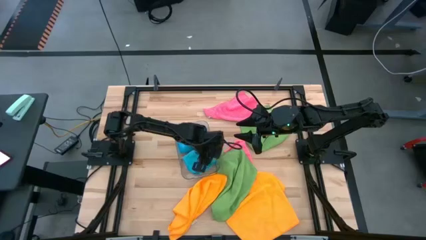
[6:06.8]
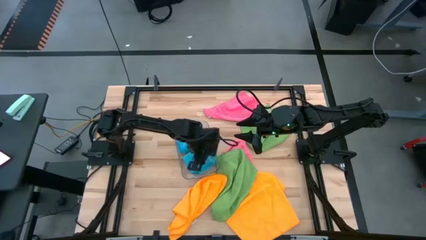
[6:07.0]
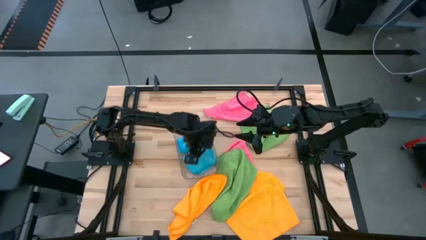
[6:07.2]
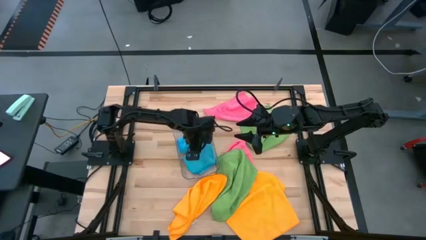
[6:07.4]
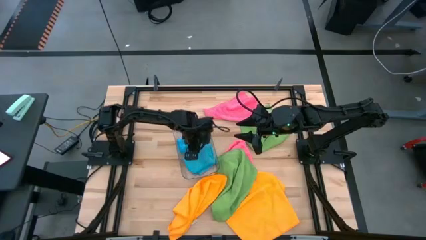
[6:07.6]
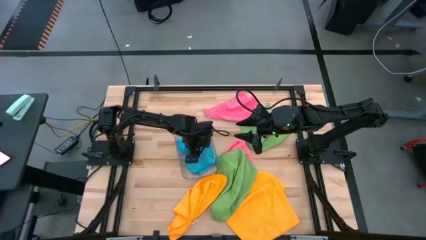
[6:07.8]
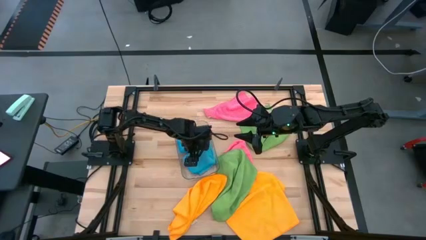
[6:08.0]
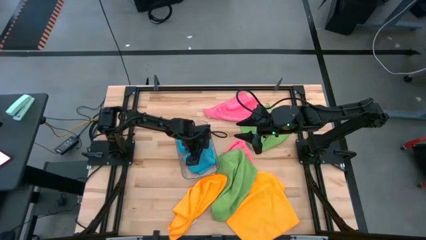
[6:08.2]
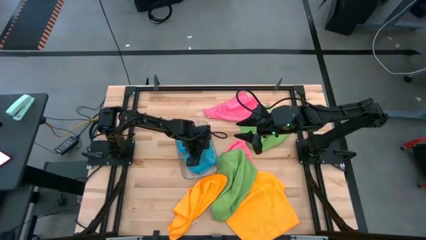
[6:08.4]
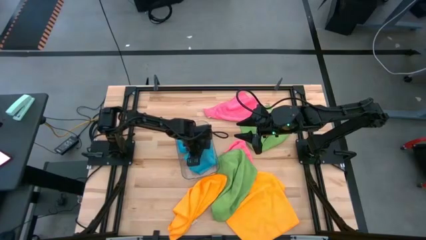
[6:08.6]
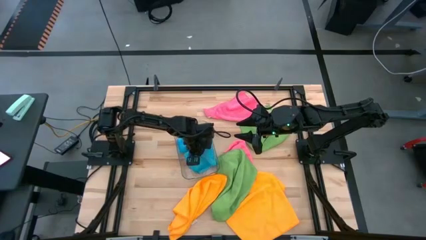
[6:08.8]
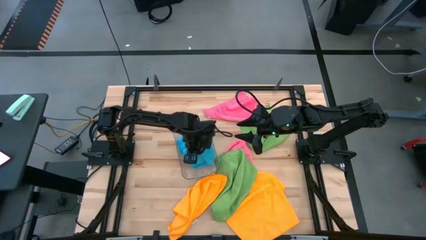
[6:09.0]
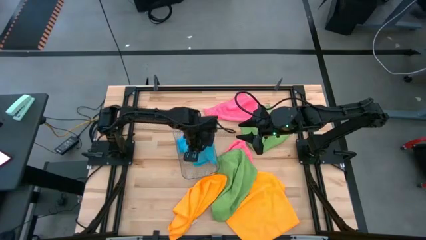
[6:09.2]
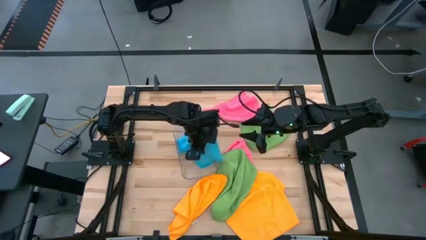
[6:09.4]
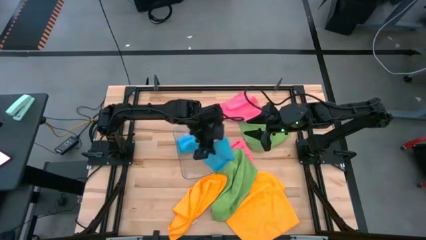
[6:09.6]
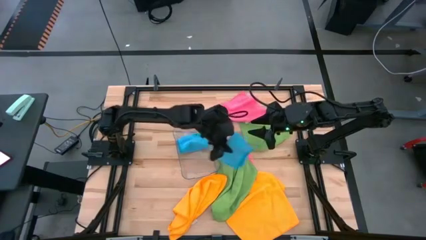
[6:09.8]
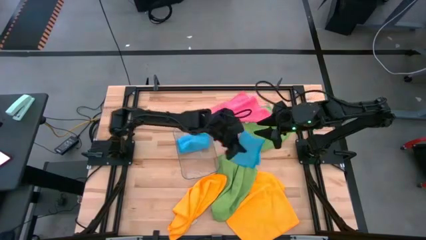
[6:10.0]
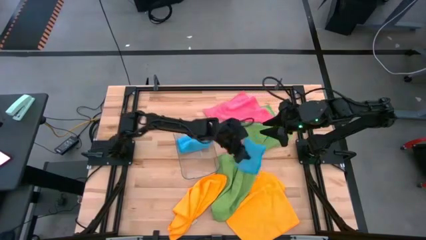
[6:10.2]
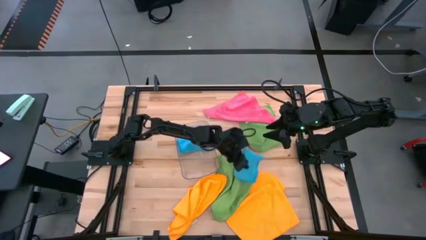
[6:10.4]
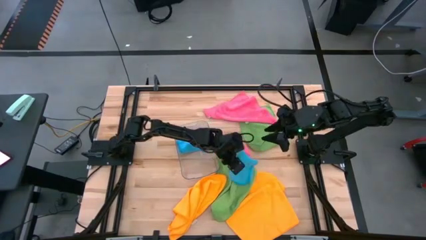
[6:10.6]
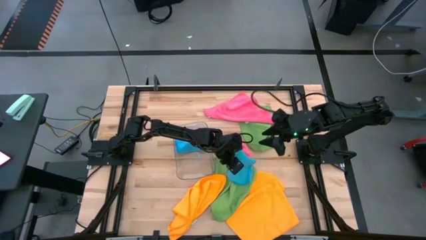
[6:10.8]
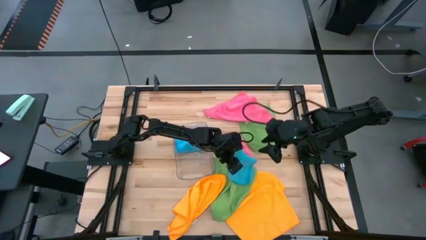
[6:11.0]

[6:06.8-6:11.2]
Task: Fold microfiber towels
Remove the blue towel from the transparent bin

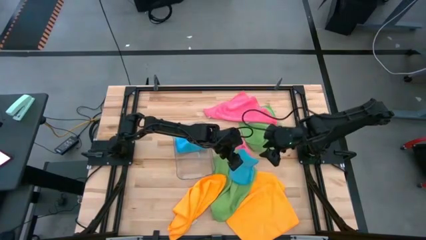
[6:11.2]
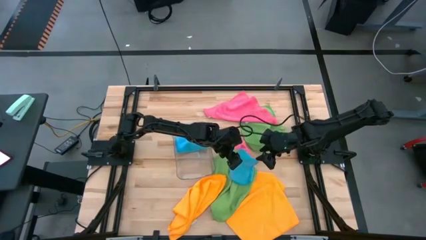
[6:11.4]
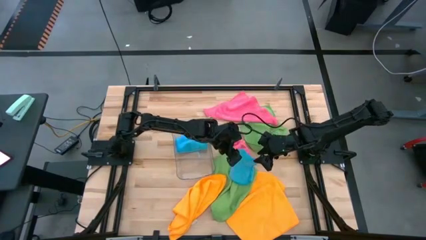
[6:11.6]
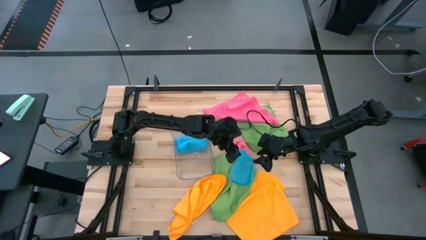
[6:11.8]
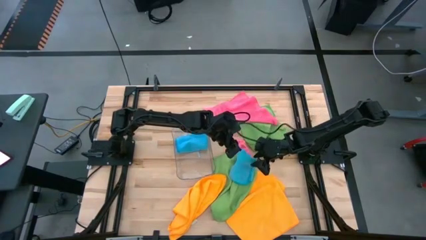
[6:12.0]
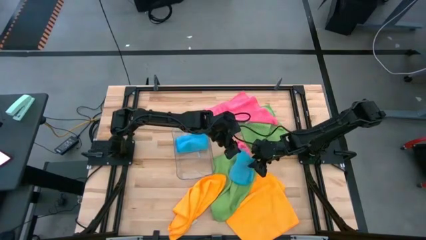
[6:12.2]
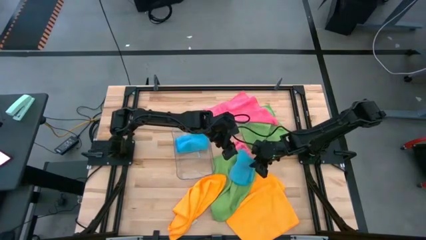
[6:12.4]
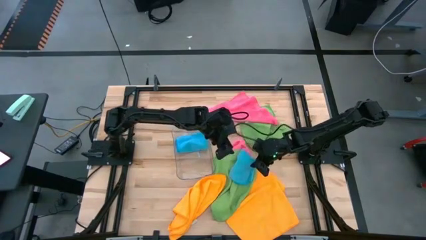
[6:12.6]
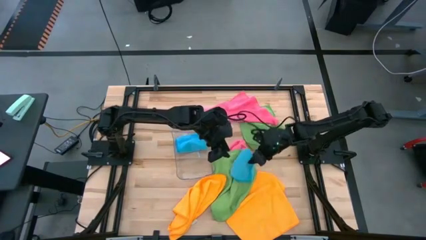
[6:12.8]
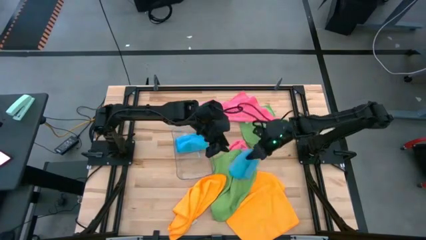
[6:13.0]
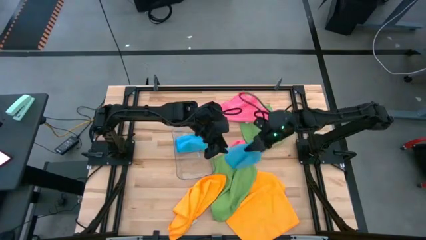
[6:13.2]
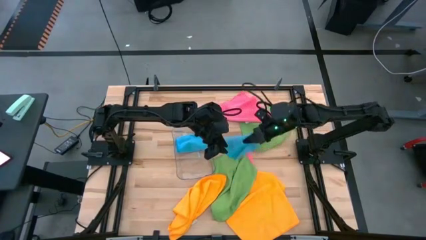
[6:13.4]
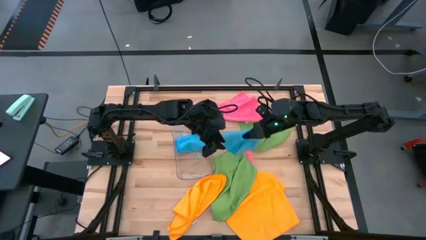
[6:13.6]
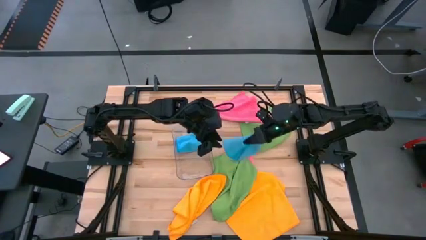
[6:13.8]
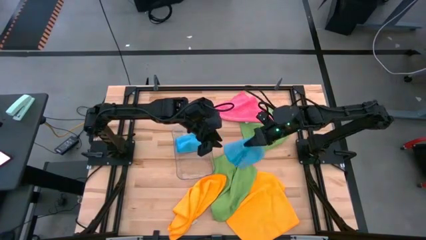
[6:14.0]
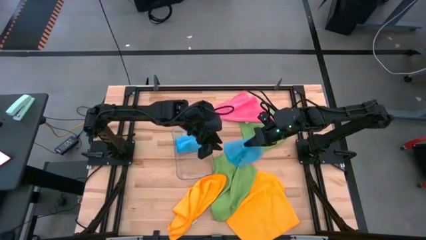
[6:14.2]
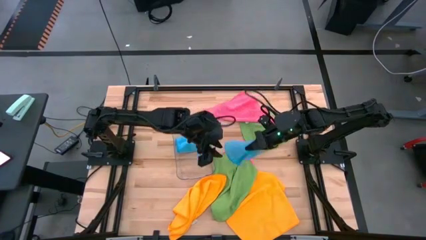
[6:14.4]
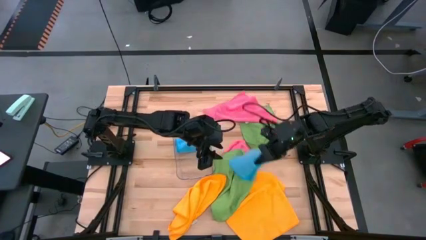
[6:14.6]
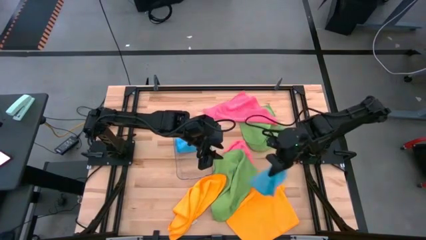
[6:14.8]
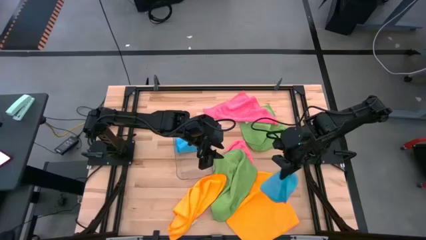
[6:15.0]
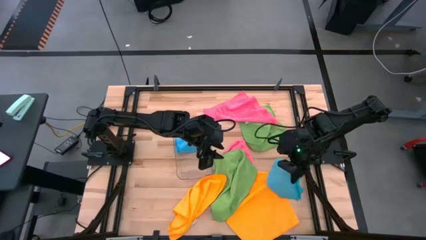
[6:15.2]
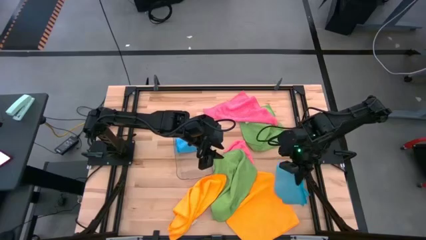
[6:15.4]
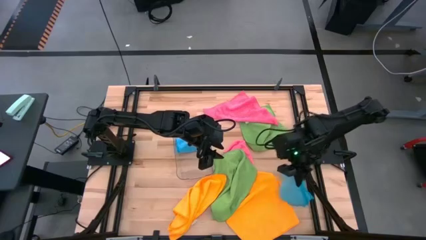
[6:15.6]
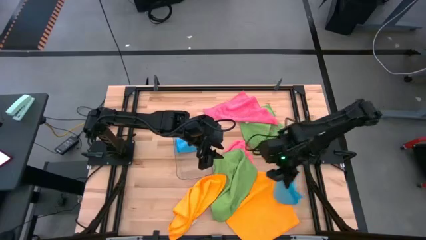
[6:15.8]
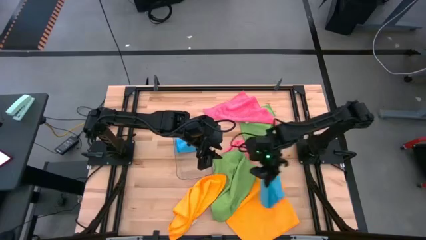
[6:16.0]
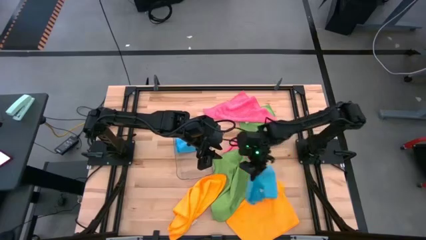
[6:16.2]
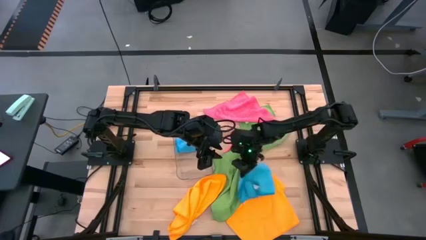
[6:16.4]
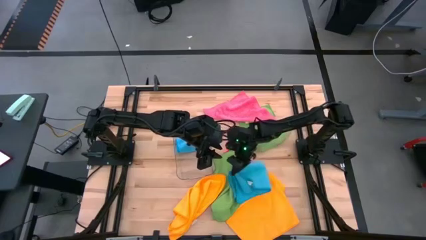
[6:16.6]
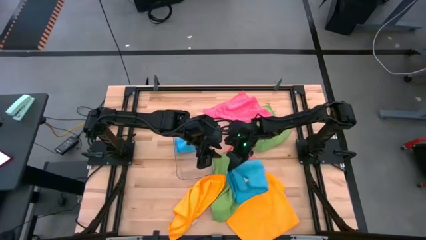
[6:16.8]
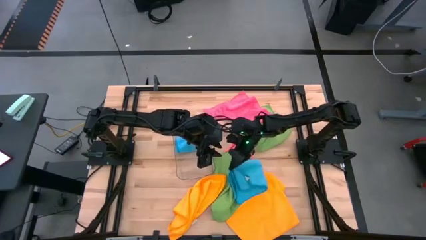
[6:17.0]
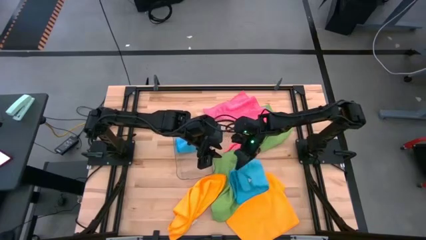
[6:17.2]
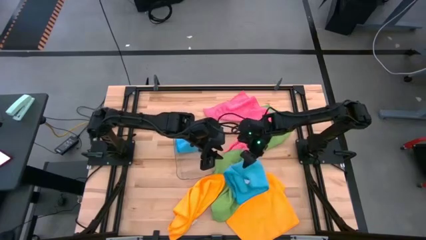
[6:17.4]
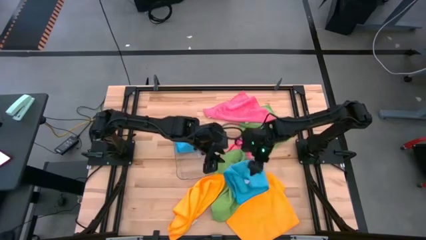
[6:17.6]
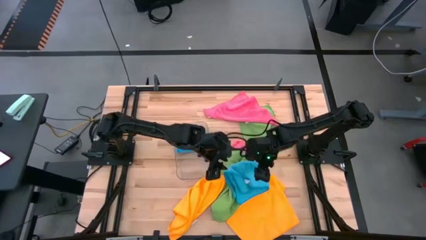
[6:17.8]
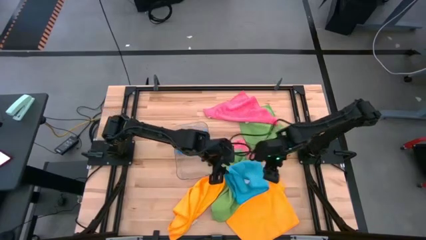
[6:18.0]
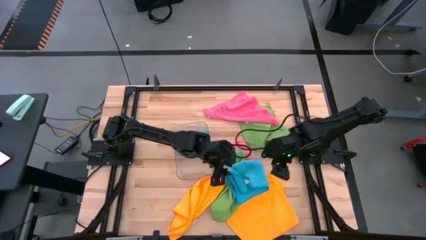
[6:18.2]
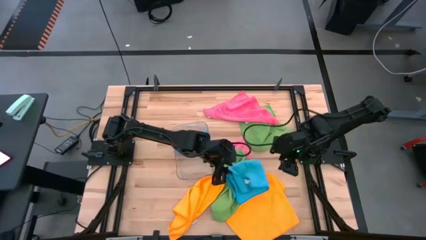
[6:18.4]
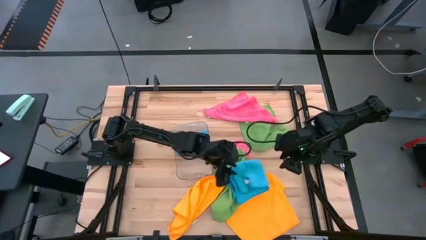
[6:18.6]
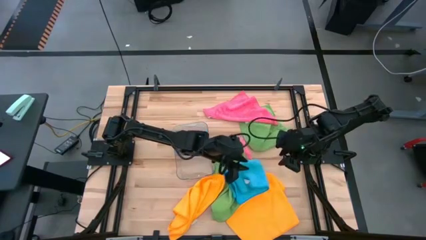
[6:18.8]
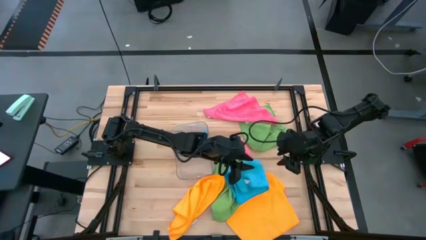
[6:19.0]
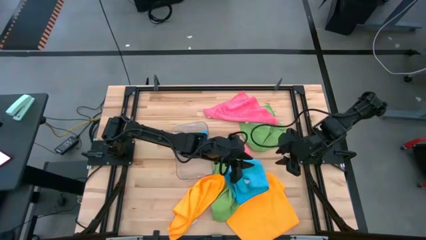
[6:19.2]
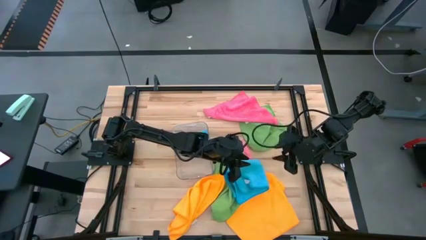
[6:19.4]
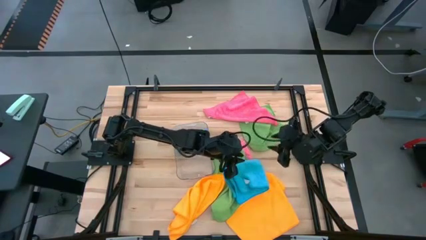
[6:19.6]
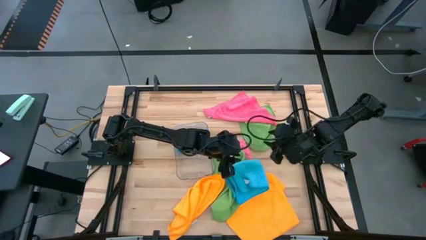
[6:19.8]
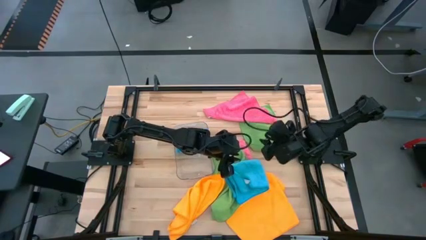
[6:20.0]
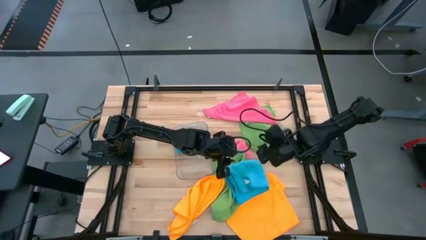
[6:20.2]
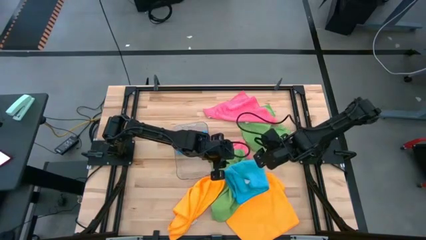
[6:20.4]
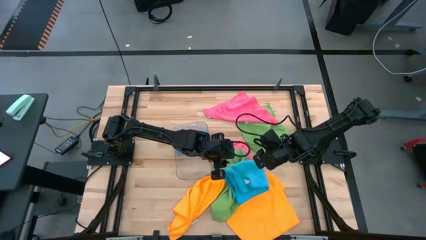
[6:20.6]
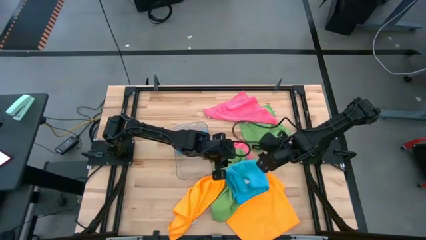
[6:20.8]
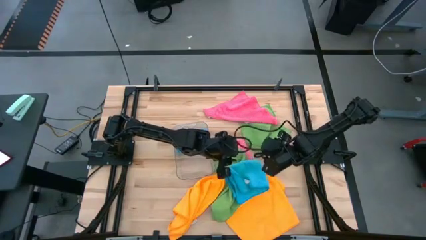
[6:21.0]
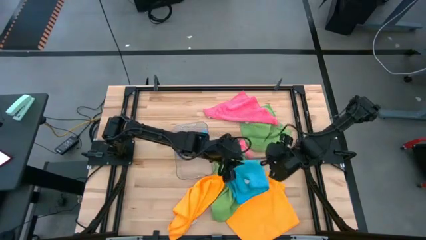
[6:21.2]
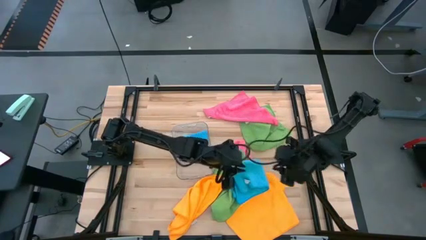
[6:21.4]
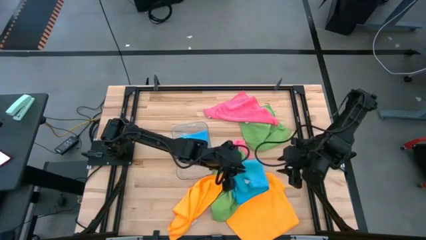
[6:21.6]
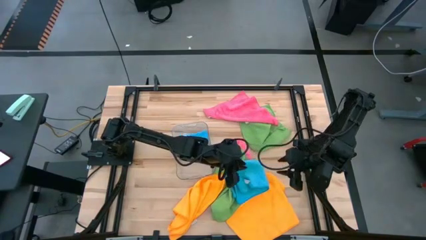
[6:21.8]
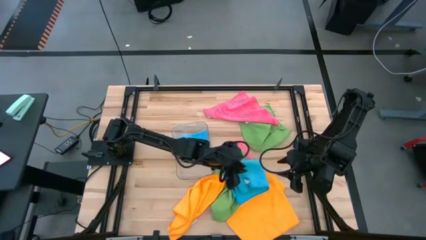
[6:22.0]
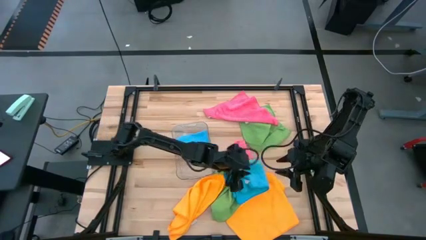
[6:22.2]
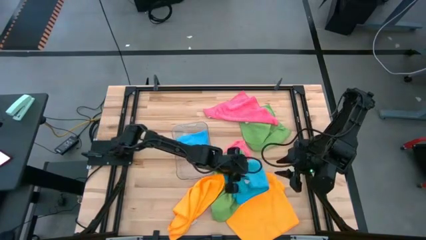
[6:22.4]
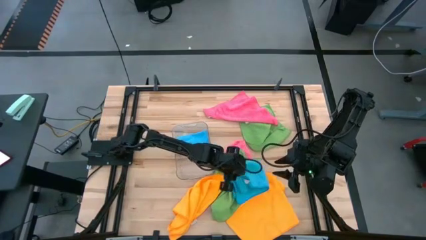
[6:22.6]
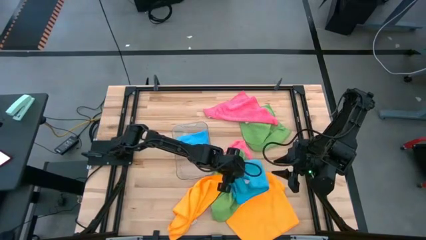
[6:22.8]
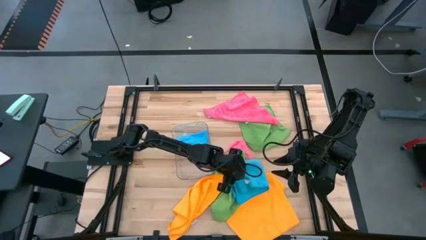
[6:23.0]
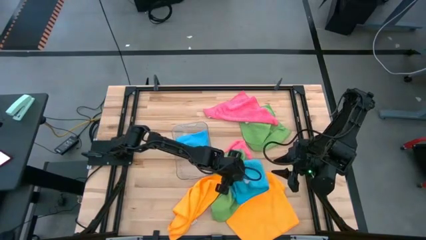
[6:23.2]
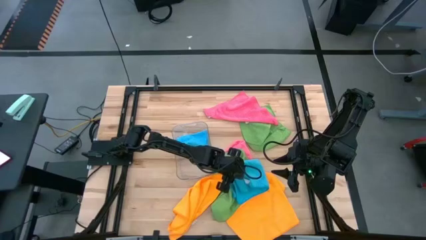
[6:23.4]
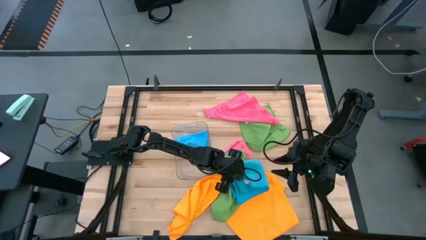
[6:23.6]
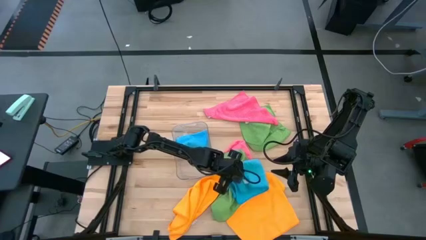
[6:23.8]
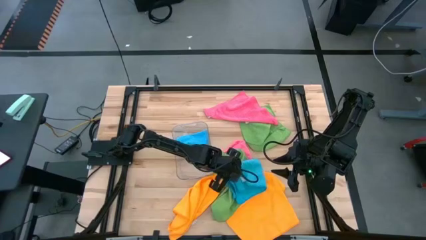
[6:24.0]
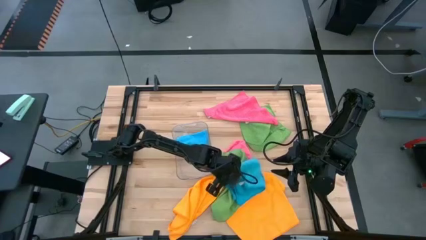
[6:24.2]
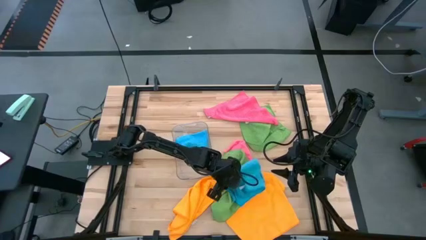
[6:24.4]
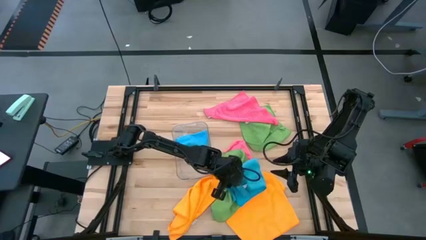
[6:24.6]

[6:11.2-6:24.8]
Fold the blue towel
